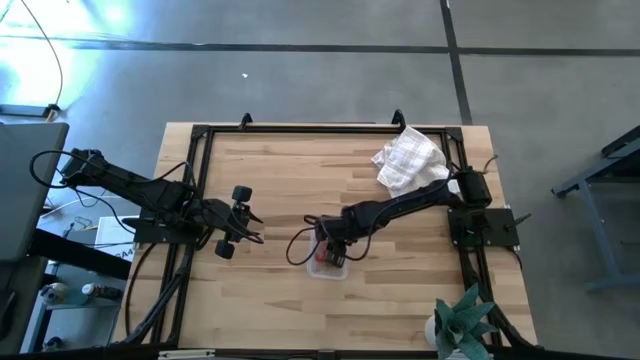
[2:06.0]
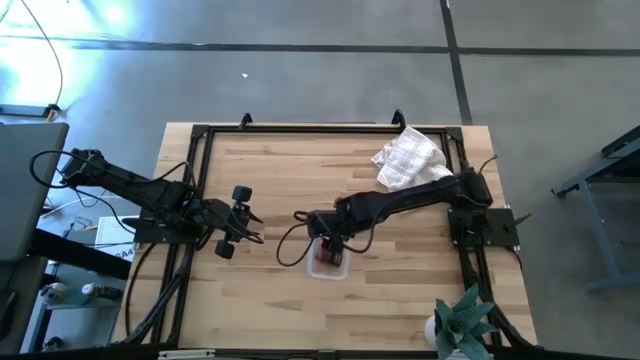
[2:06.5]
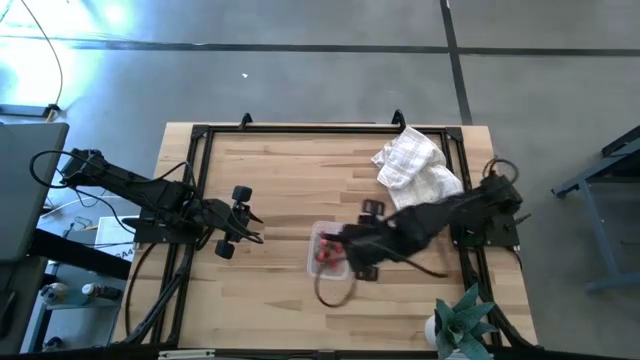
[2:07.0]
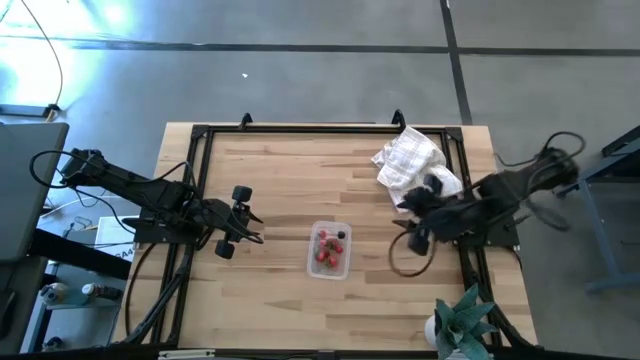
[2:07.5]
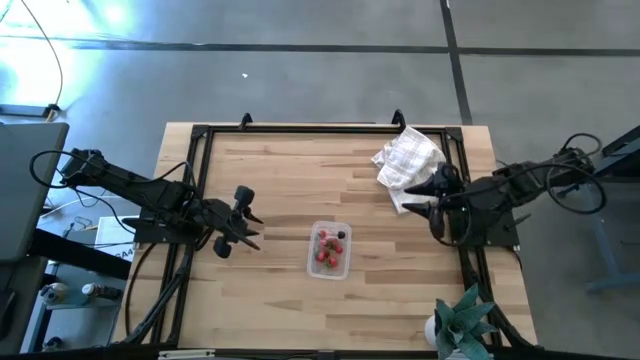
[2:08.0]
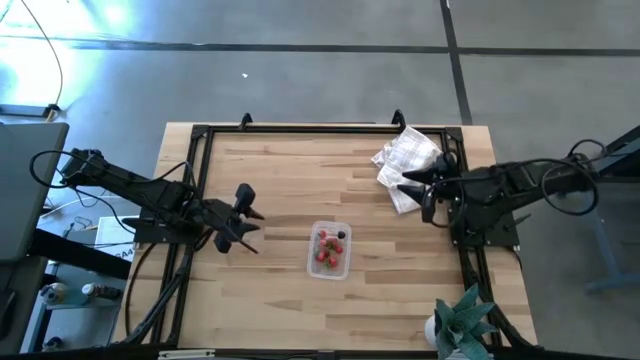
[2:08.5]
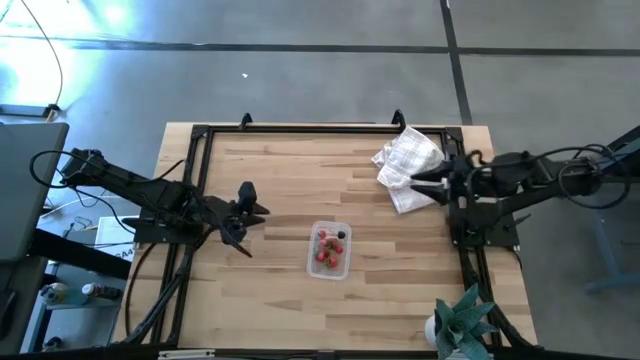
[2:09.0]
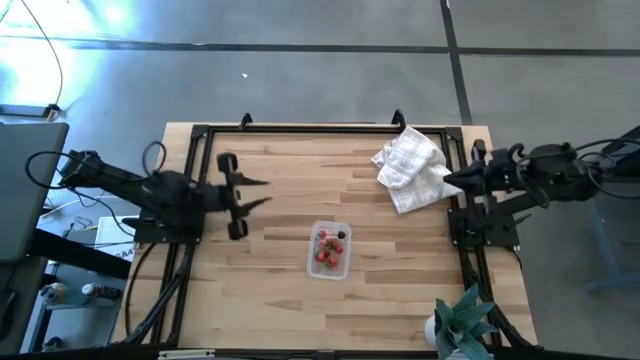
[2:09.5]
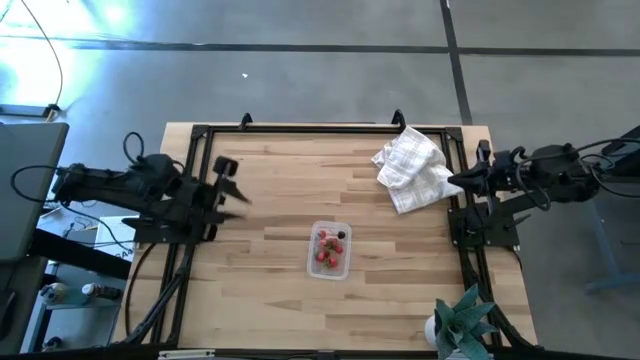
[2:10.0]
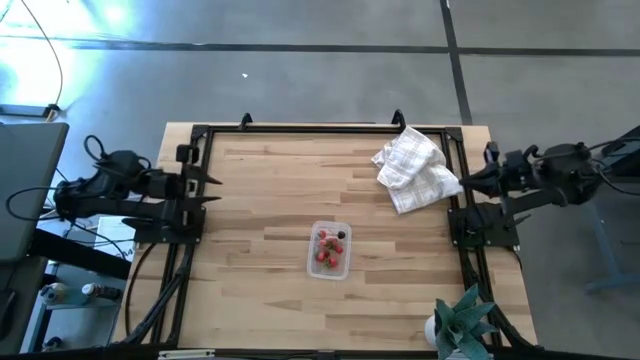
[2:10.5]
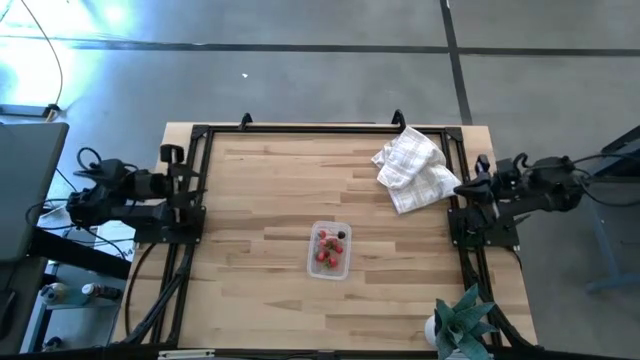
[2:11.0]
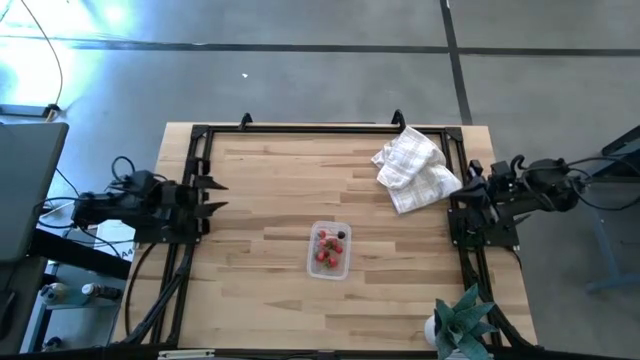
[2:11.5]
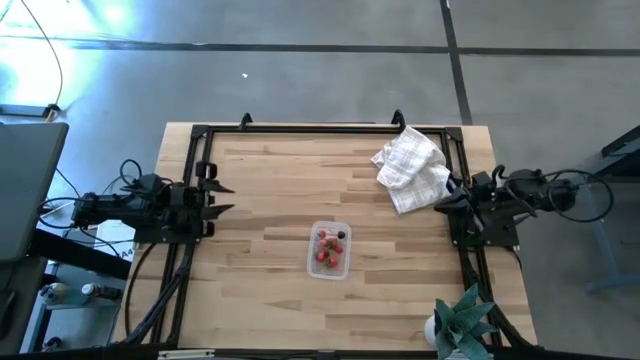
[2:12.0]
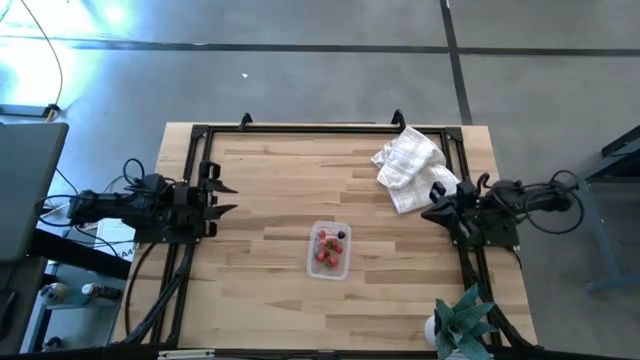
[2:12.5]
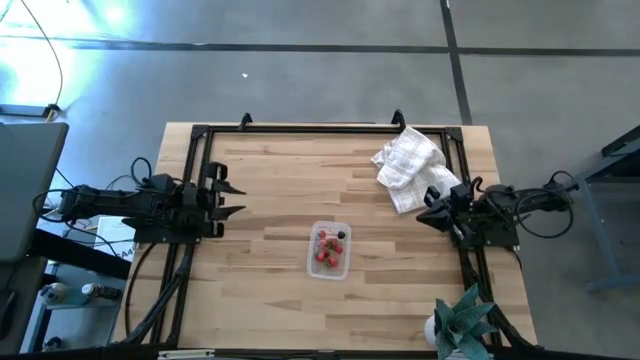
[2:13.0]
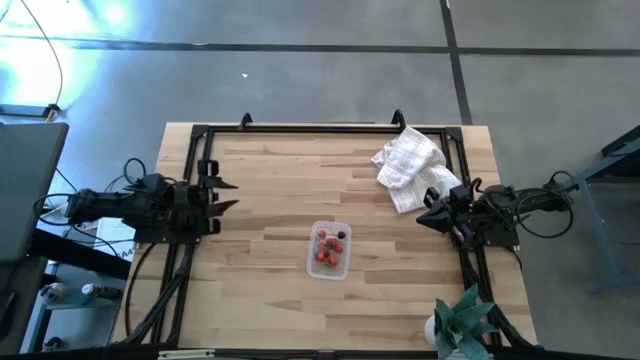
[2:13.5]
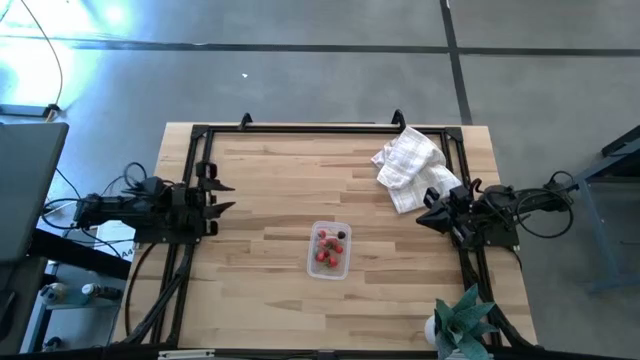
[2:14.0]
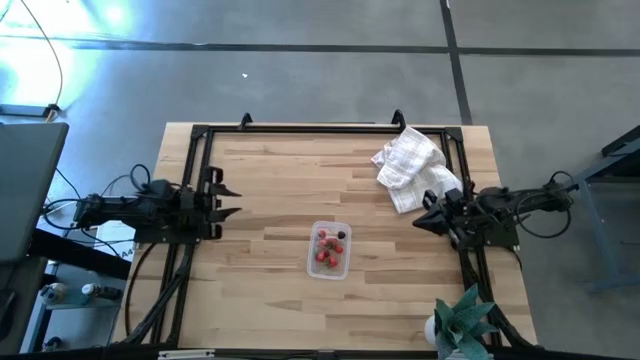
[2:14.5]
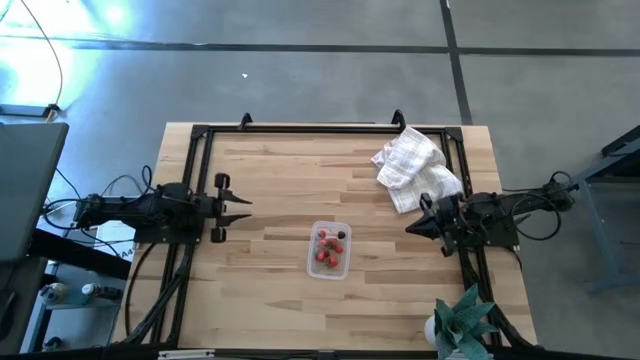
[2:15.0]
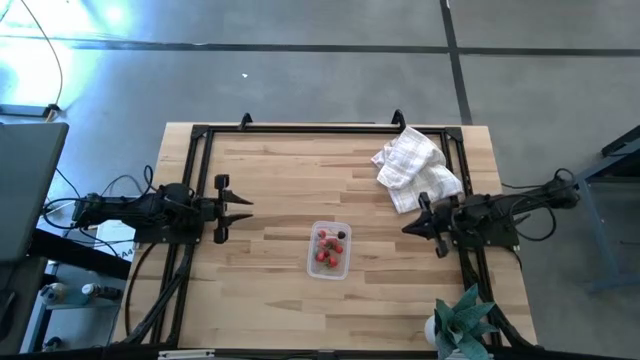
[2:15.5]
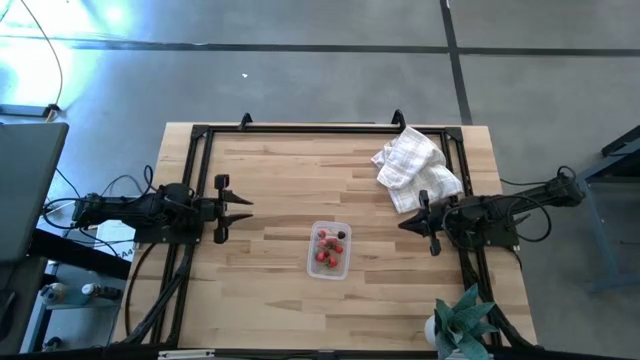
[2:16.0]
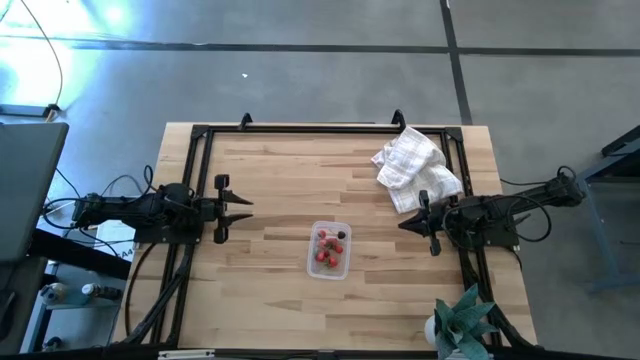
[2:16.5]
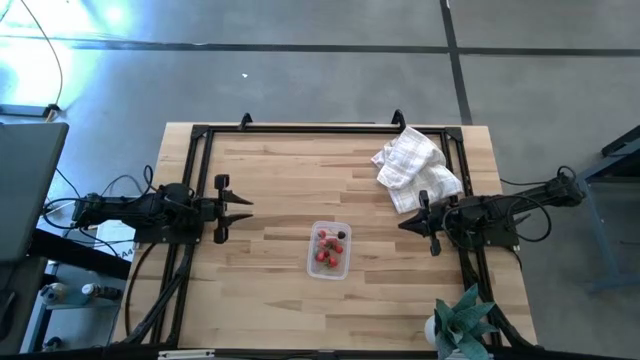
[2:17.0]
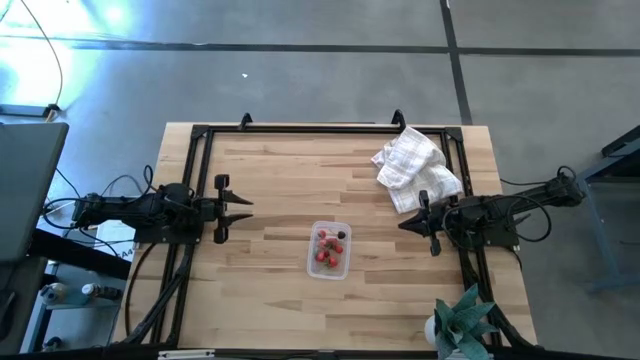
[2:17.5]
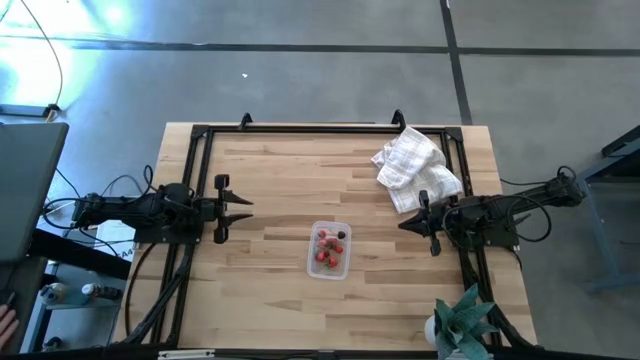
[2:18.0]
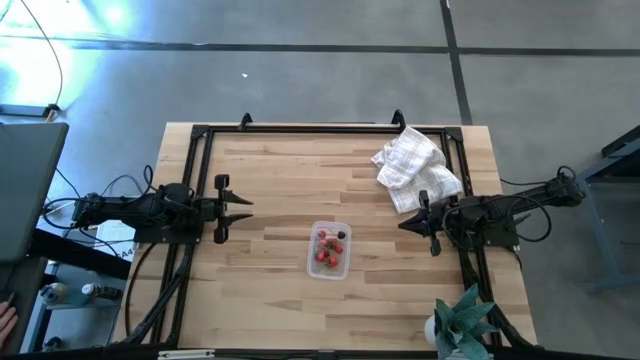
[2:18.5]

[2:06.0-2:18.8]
Task: Pick and placing Produce into tupperware
Return to Home Position
